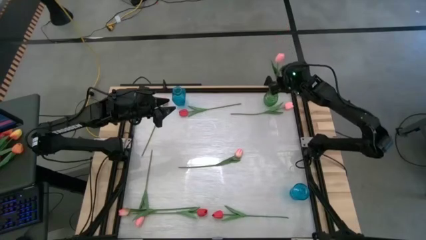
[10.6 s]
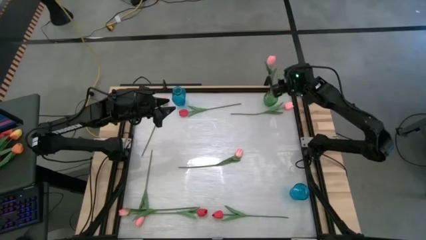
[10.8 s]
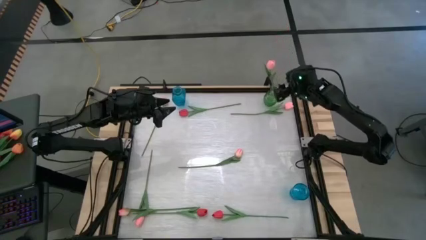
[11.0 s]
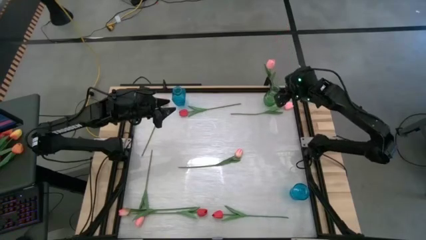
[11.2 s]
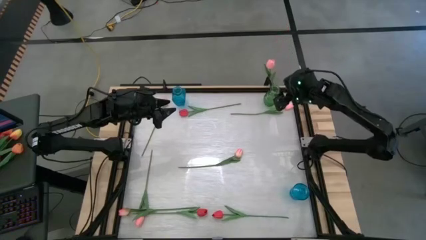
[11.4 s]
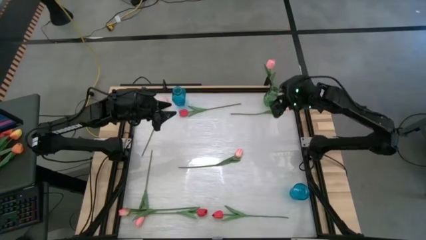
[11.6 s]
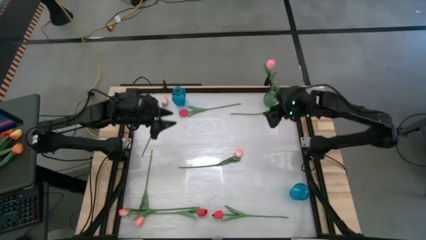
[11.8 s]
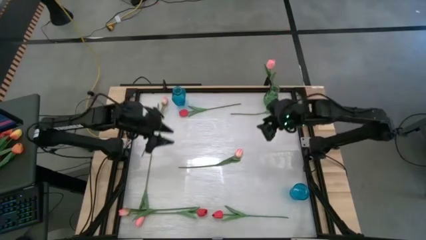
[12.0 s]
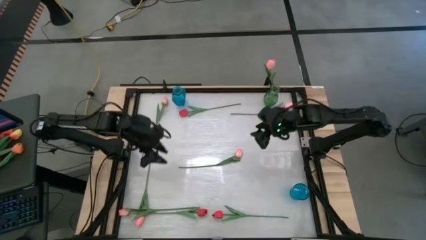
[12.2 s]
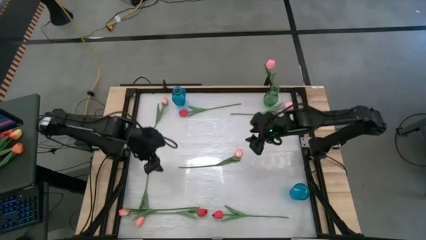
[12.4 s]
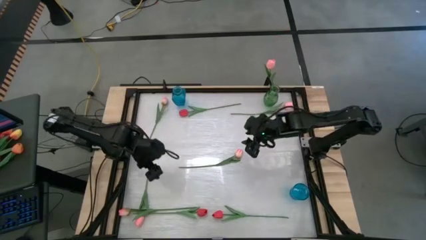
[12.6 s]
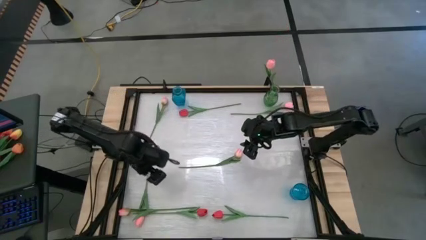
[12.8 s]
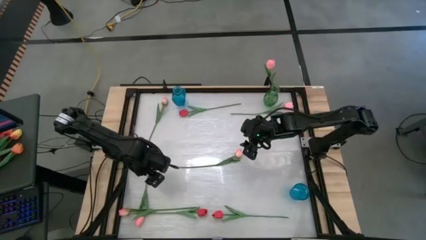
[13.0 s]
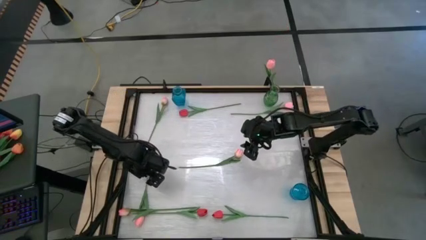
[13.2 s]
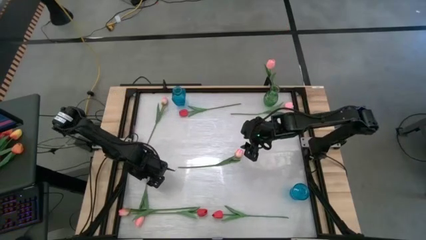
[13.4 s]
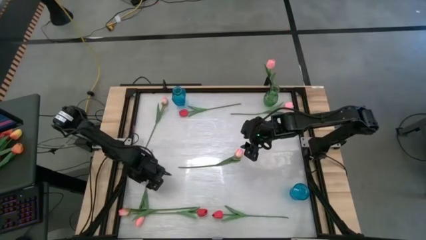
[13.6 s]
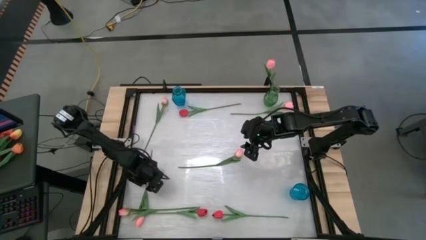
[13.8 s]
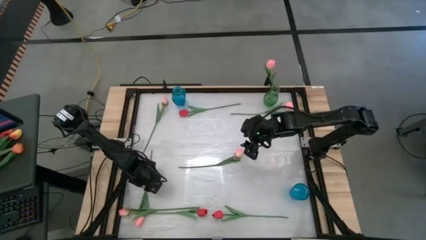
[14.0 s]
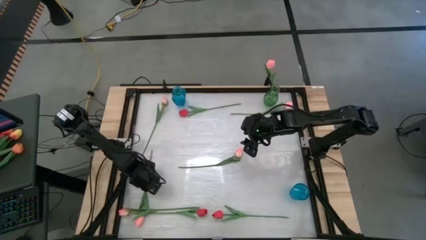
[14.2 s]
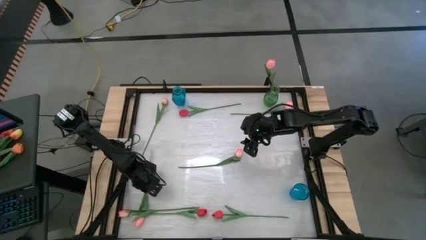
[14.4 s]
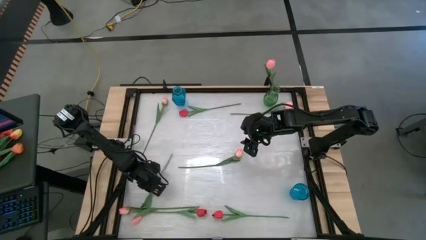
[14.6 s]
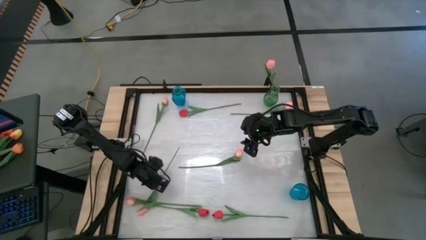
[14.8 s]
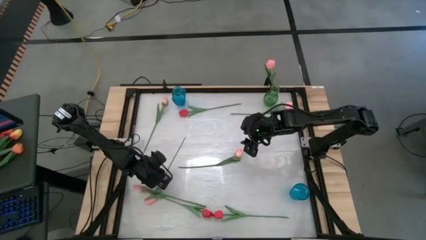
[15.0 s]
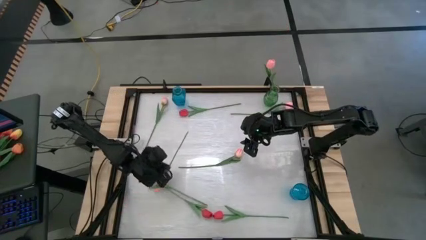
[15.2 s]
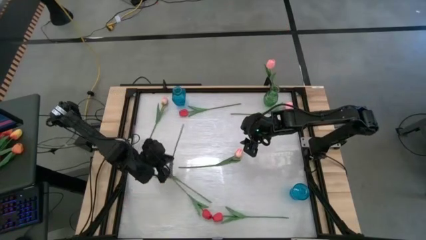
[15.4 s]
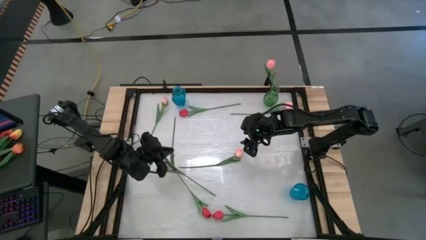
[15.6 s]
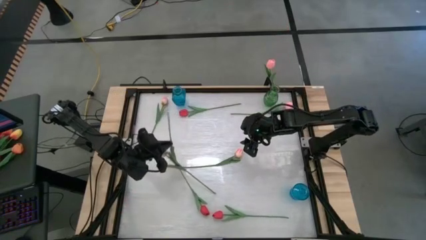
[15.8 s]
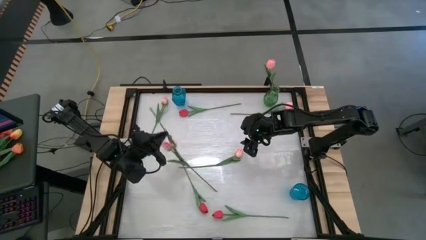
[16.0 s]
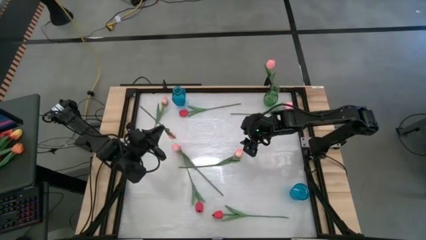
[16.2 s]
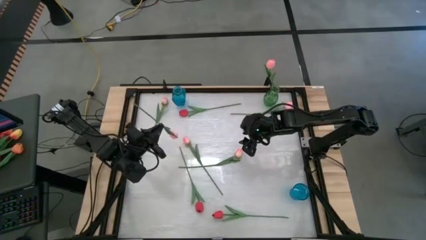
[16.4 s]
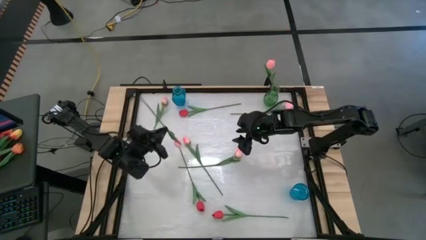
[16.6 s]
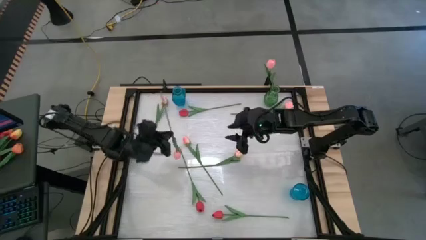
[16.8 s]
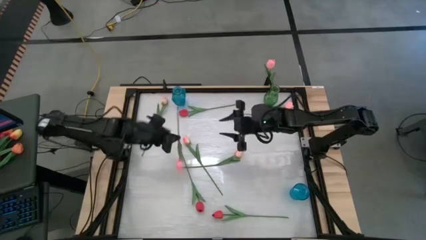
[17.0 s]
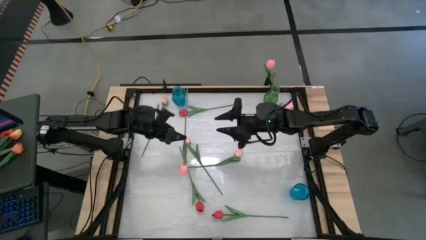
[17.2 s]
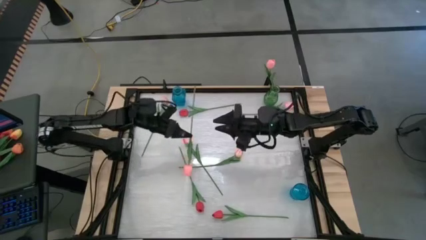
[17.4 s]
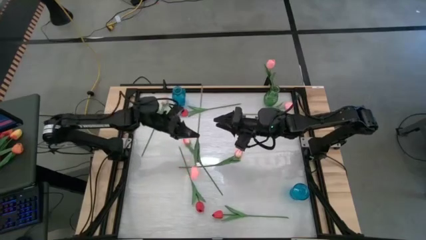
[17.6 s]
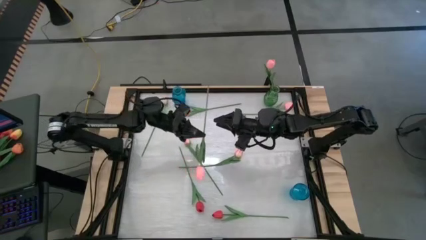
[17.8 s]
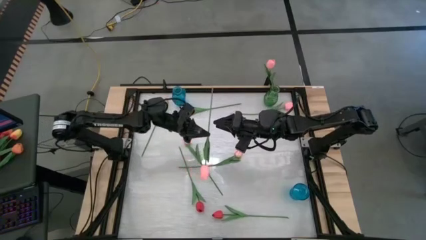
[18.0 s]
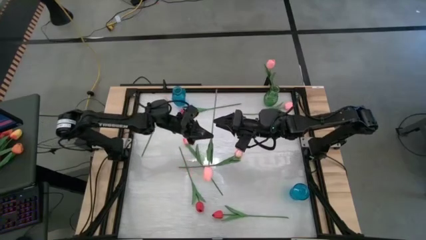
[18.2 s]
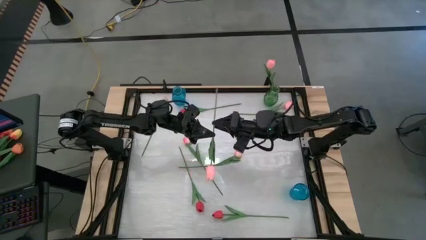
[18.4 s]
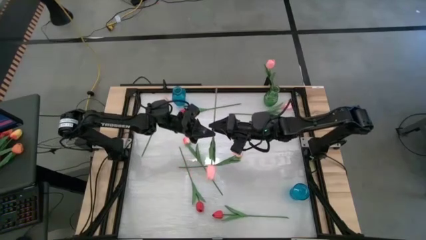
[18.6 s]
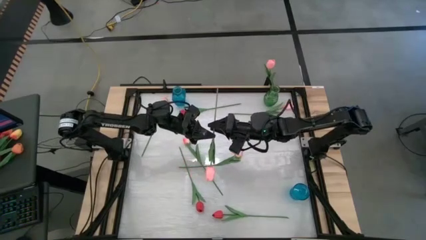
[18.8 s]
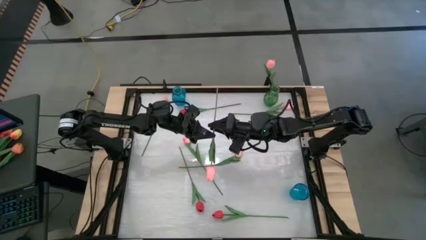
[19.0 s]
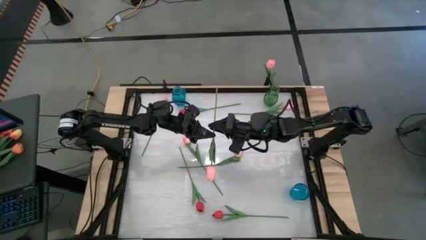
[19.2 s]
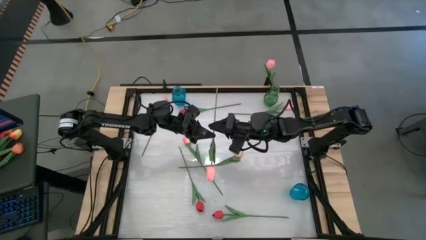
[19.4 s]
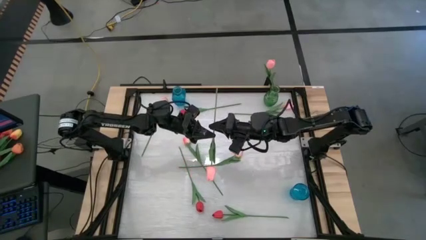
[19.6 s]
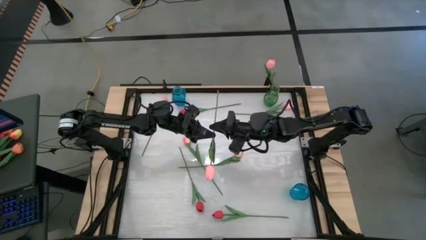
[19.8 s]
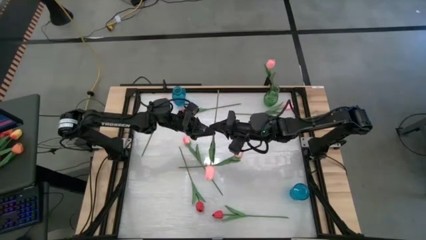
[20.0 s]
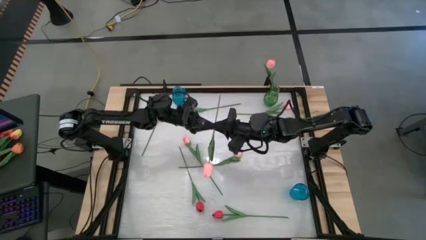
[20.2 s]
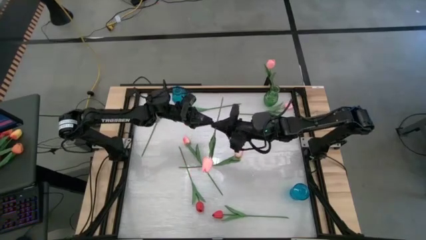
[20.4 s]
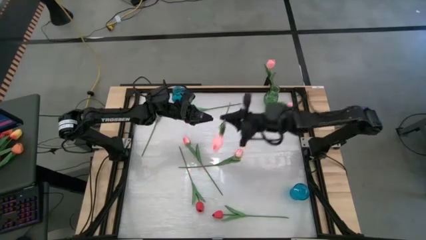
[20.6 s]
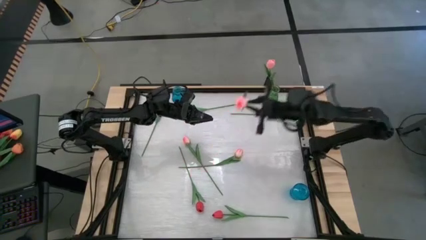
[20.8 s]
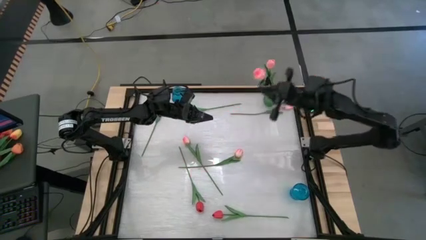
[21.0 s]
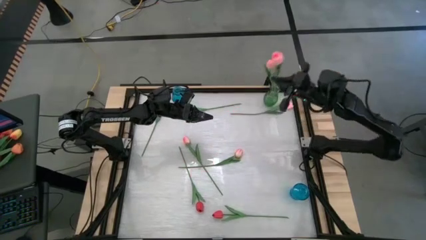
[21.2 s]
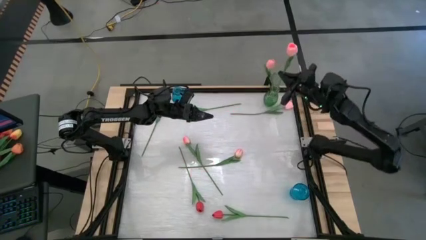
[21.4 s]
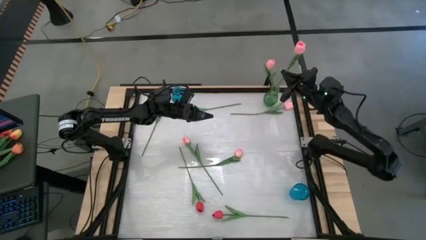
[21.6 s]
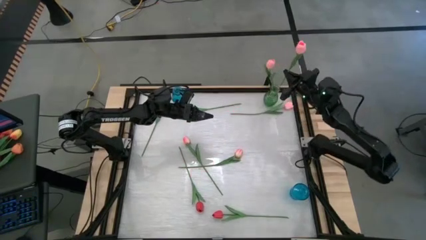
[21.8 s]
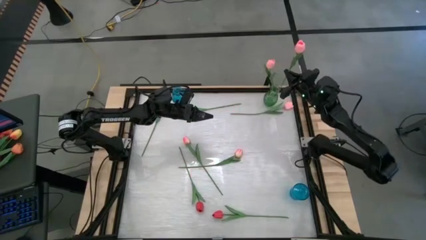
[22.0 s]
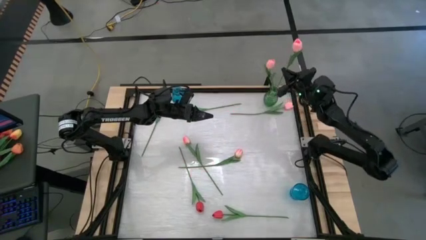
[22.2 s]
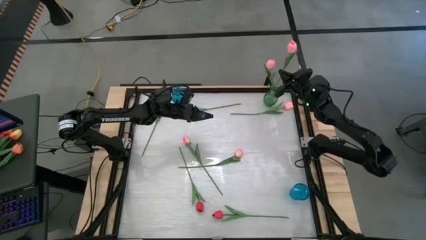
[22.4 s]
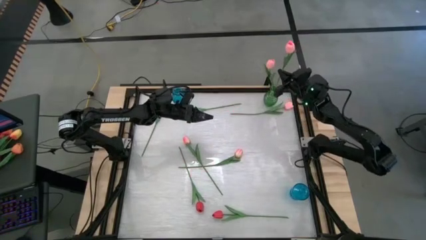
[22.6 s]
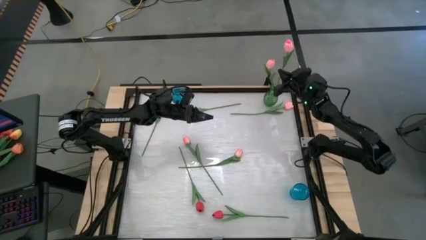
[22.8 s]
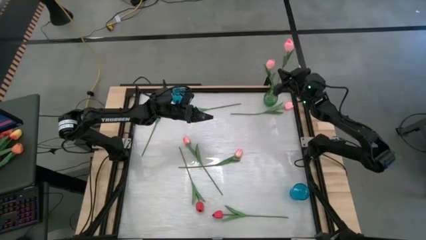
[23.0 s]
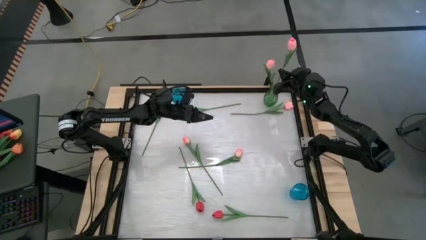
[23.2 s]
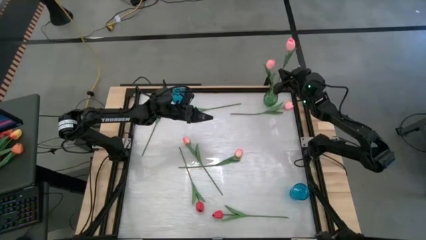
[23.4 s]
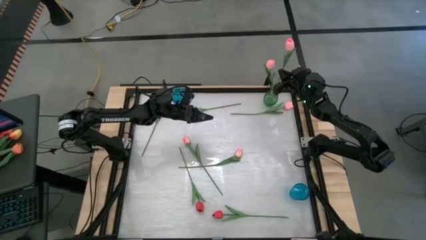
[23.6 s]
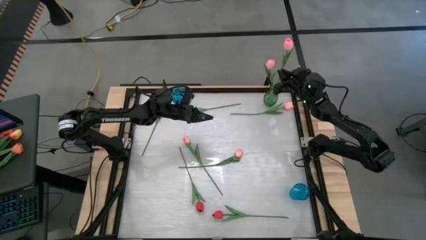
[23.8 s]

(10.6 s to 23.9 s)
Task: Sort flowers into vase by color
Put the bottom left pink flower into the green vase
